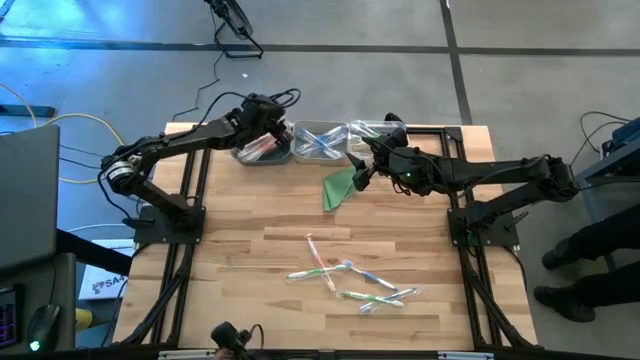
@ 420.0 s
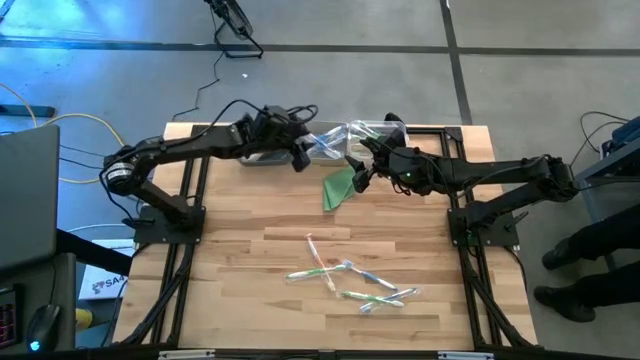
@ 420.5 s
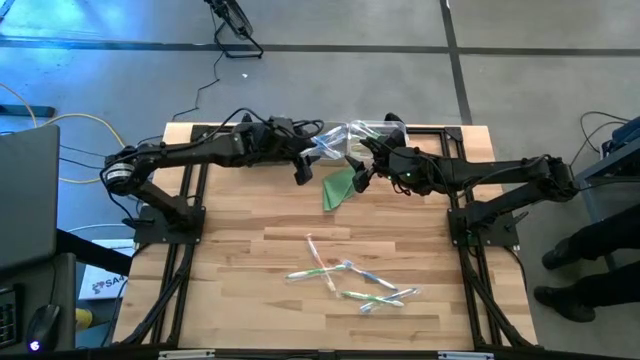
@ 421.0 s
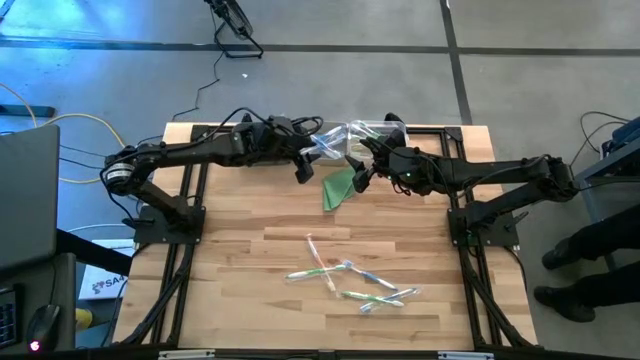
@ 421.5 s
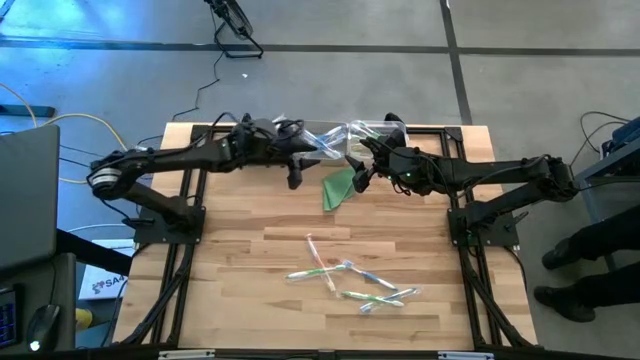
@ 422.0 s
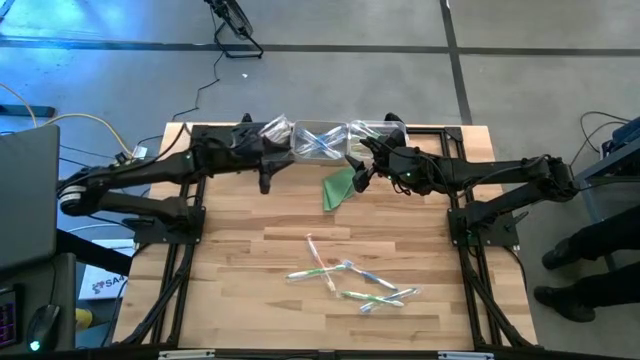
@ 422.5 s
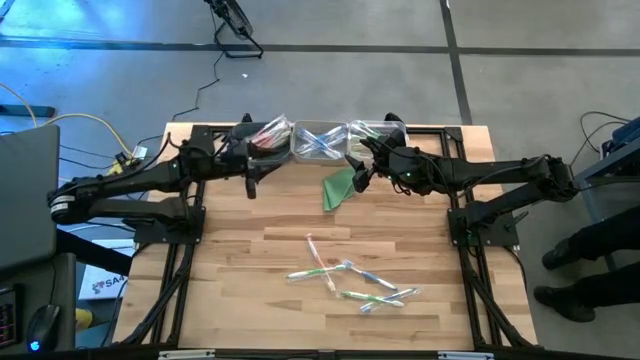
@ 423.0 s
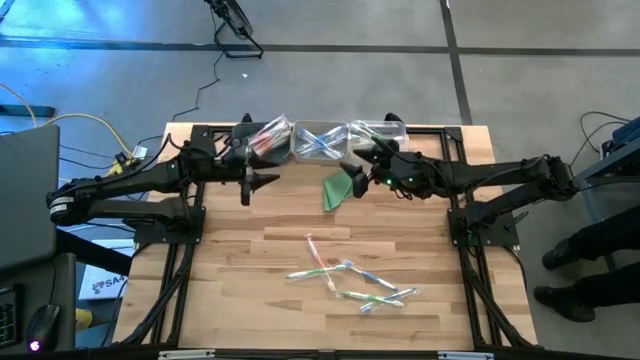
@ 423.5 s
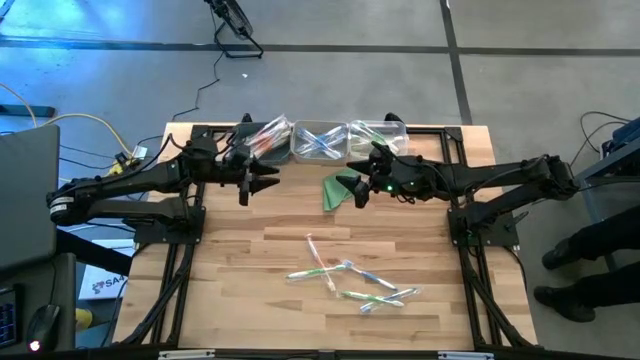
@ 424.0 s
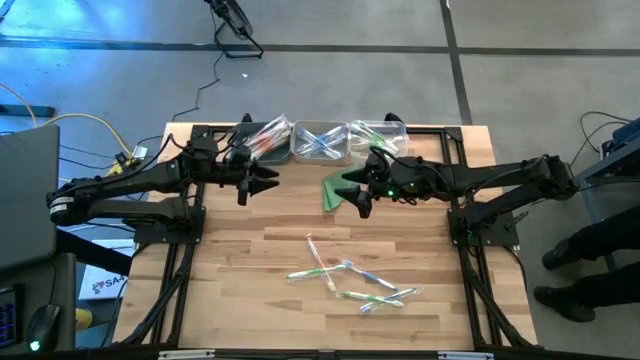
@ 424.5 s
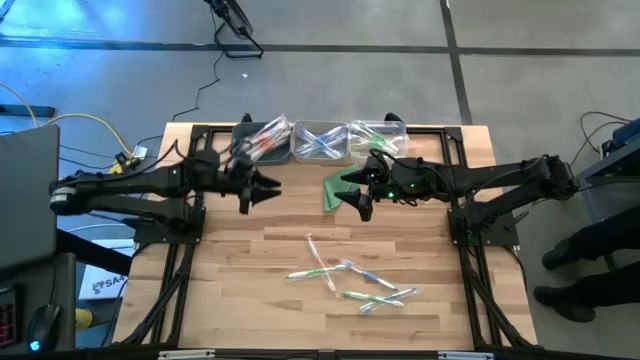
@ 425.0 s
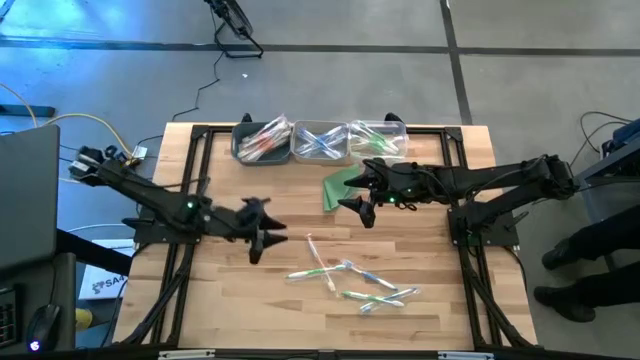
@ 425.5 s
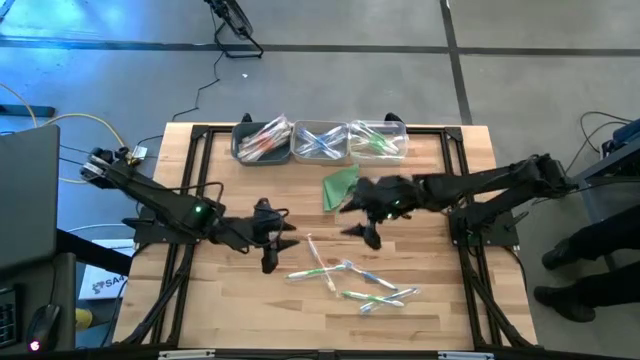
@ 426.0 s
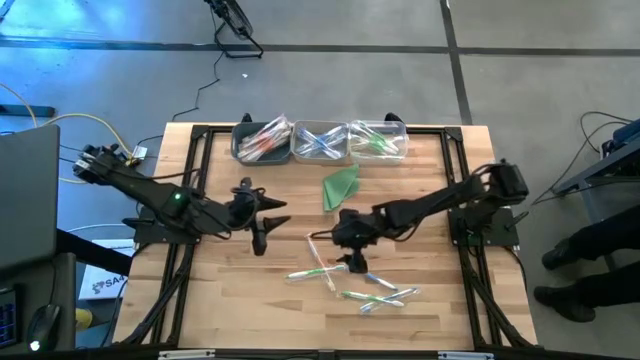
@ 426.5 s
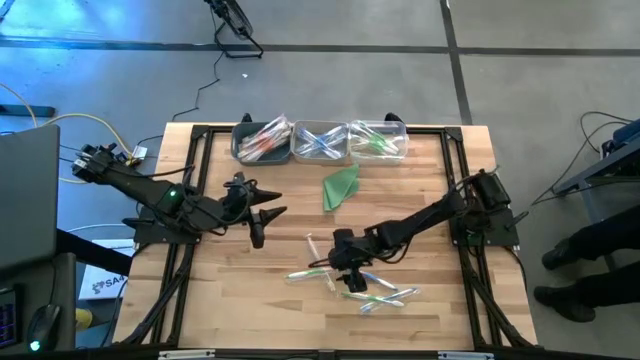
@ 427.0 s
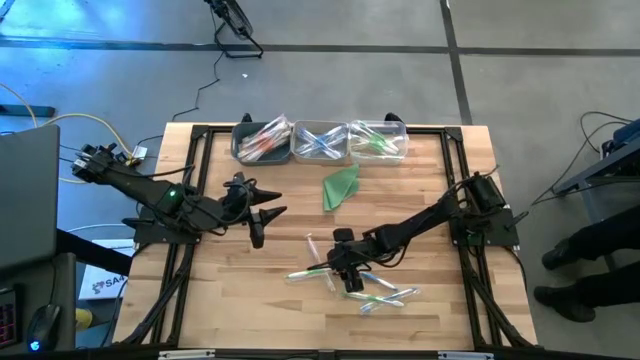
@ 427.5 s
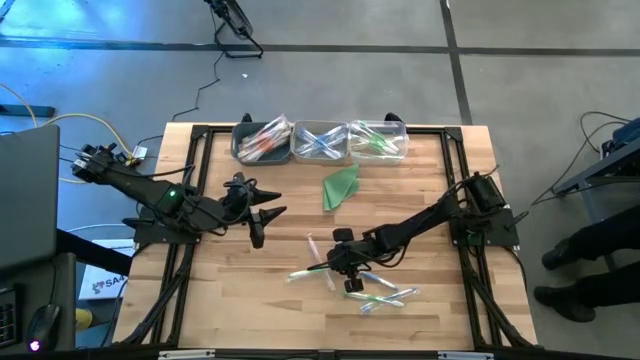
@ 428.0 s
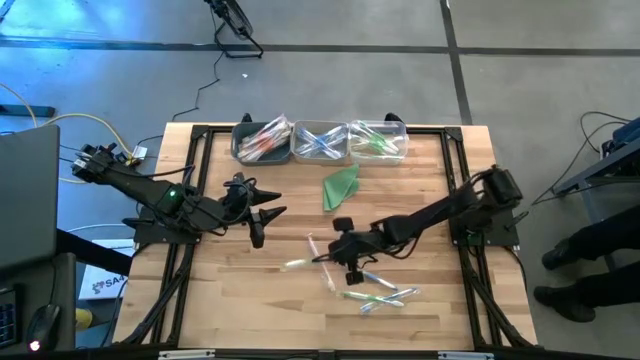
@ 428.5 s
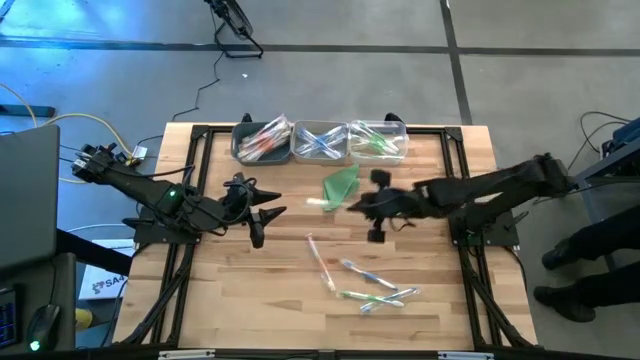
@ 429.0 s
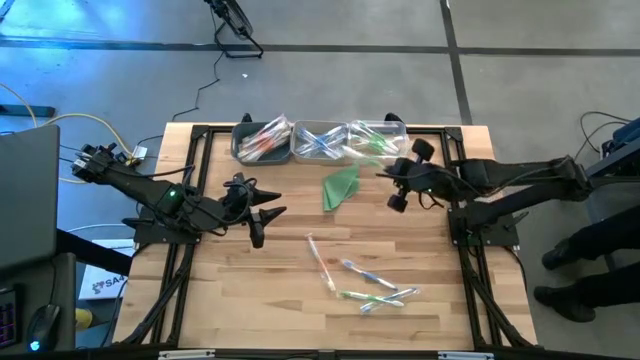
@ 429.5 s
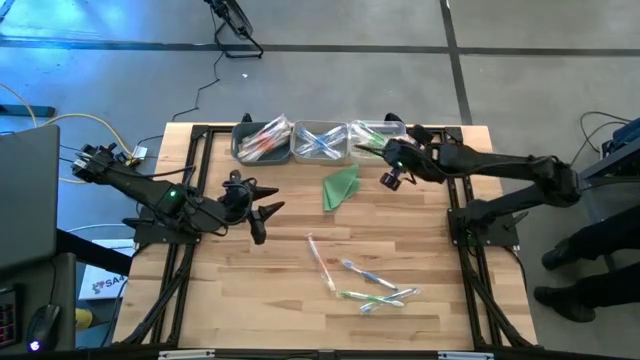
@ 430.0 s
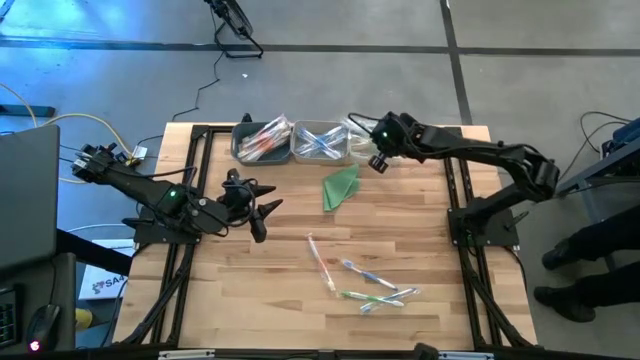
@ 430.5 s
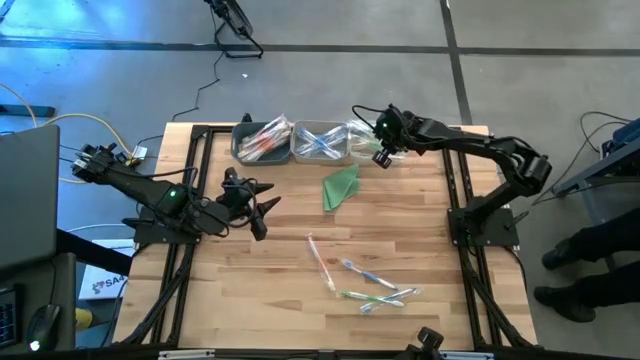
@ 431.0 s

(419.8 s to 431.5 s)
Task: Pick & Place Toothbrushes
Put the green toothbrush into the transparent bin

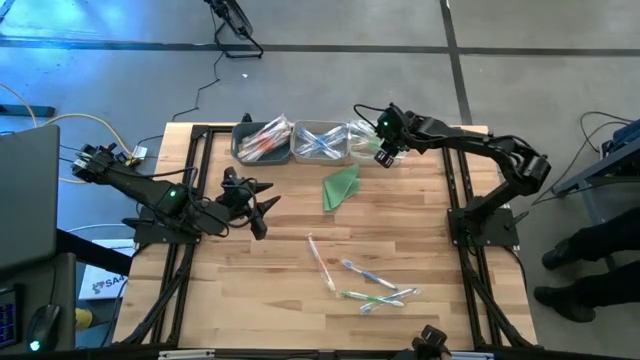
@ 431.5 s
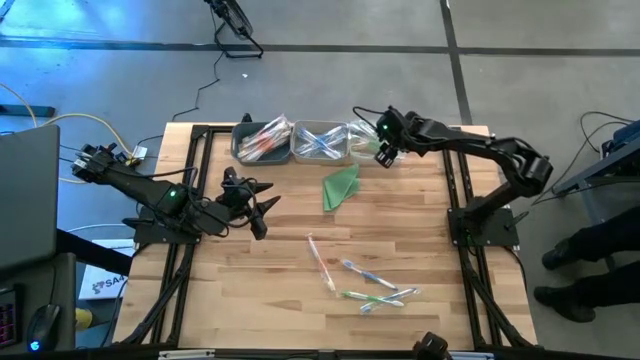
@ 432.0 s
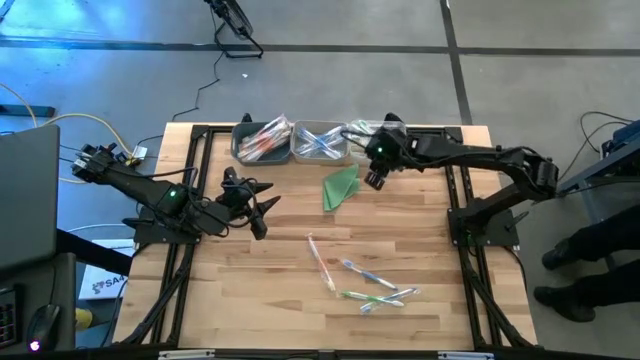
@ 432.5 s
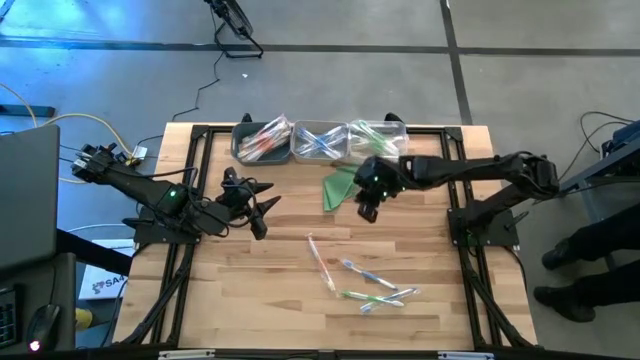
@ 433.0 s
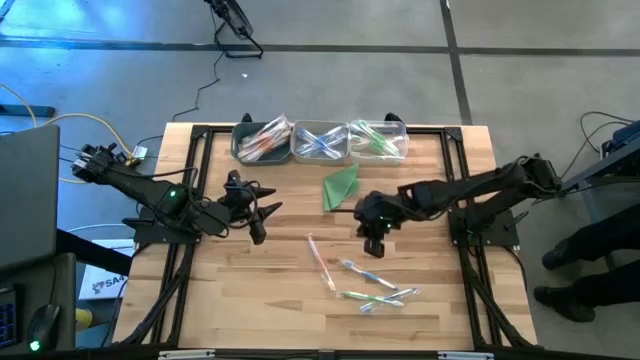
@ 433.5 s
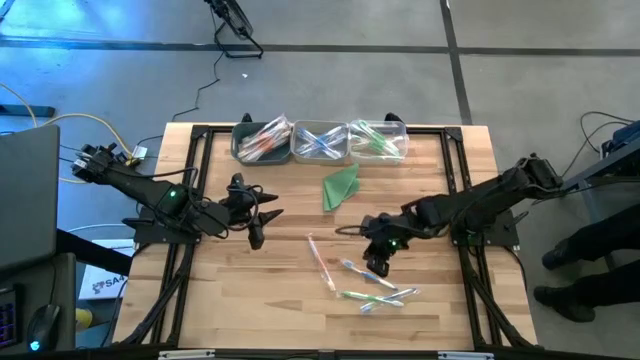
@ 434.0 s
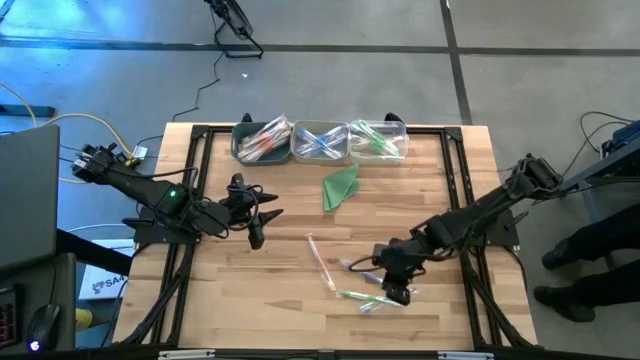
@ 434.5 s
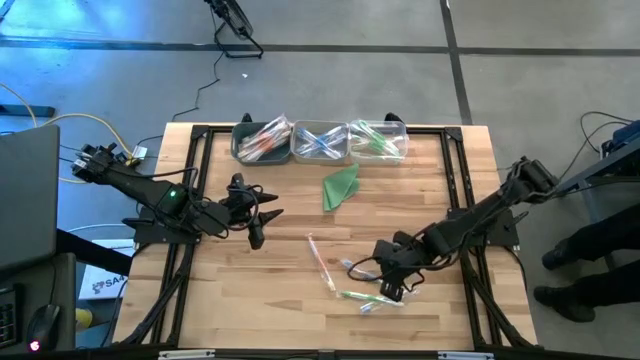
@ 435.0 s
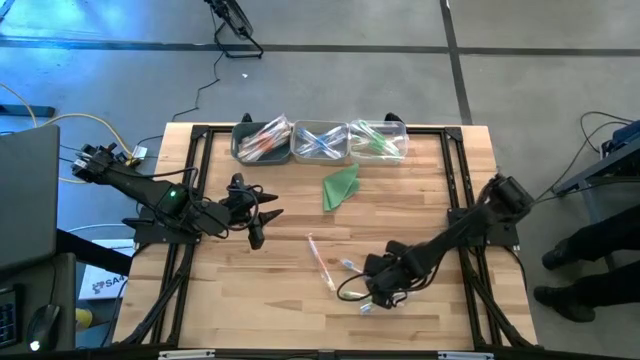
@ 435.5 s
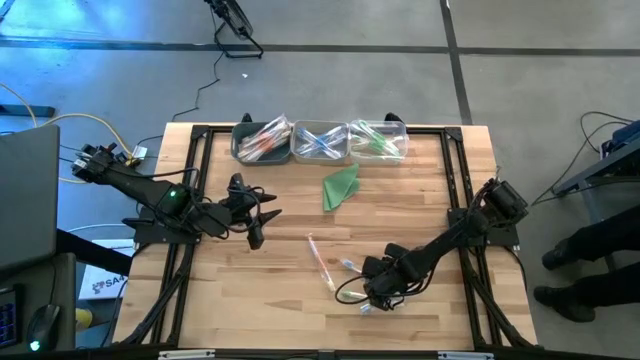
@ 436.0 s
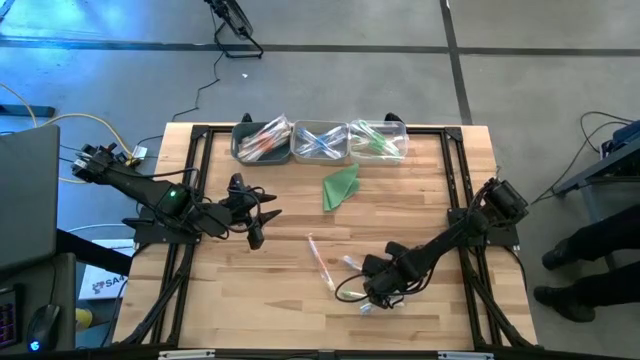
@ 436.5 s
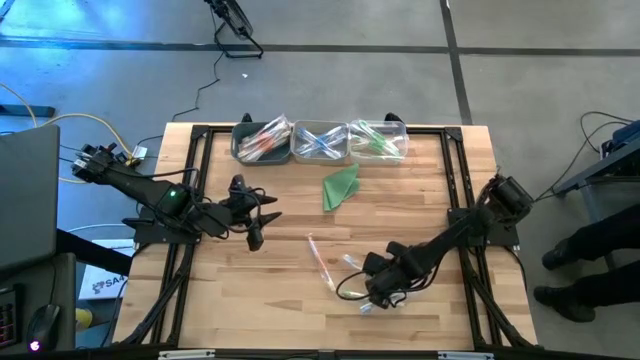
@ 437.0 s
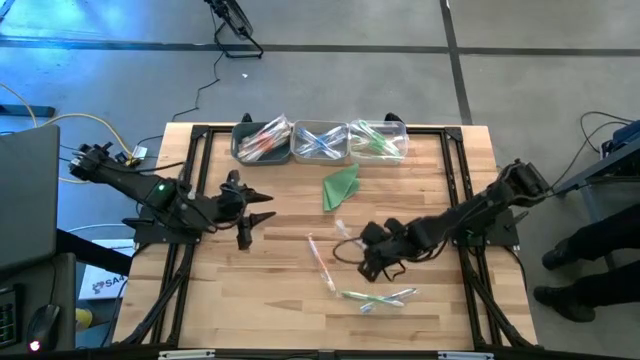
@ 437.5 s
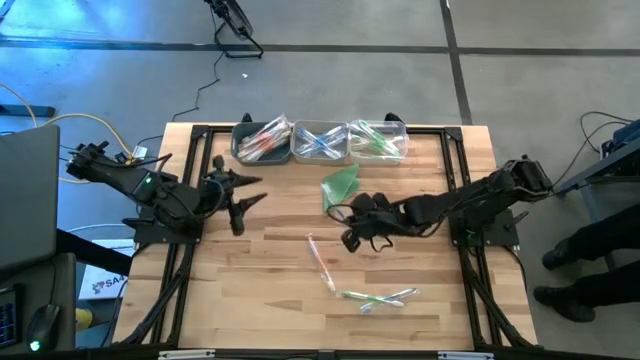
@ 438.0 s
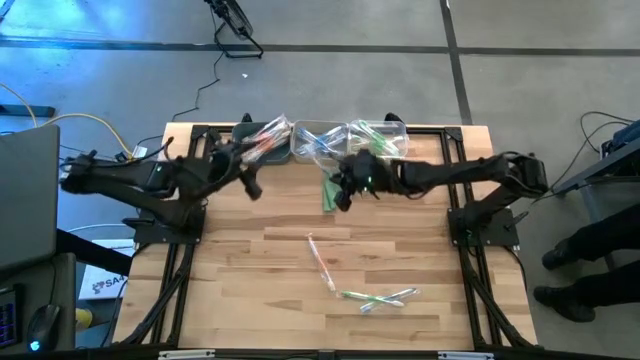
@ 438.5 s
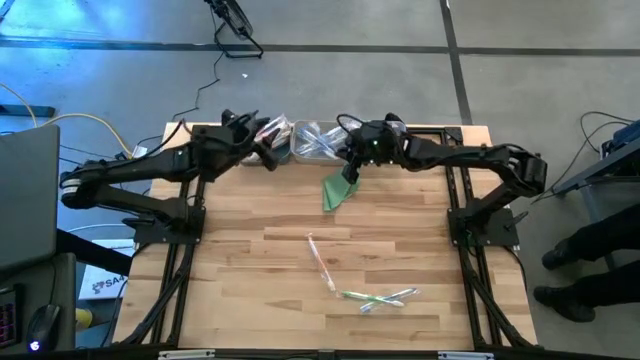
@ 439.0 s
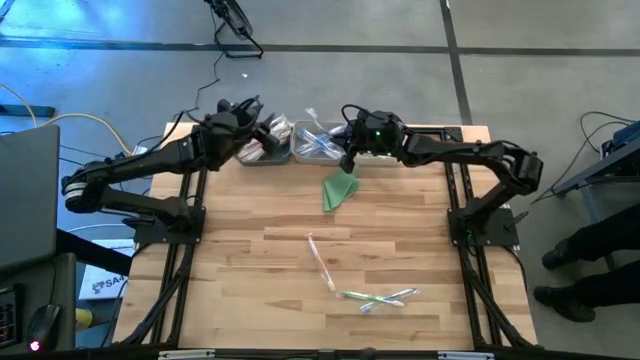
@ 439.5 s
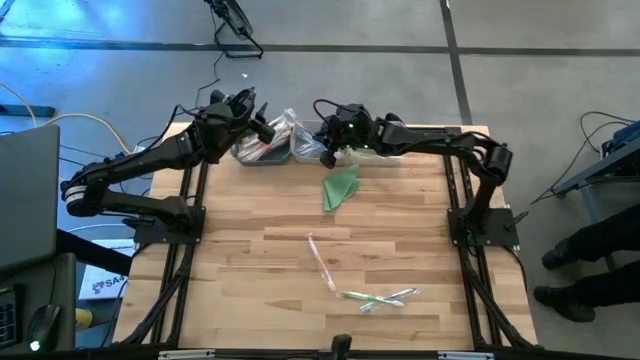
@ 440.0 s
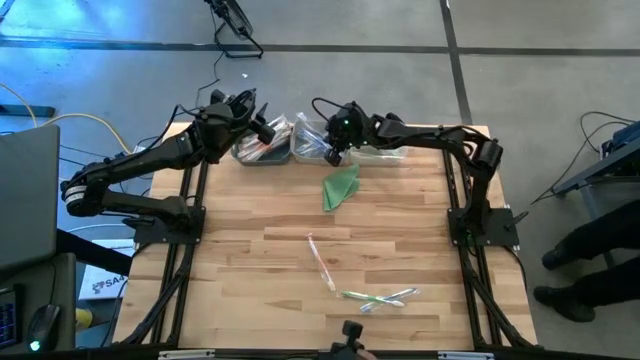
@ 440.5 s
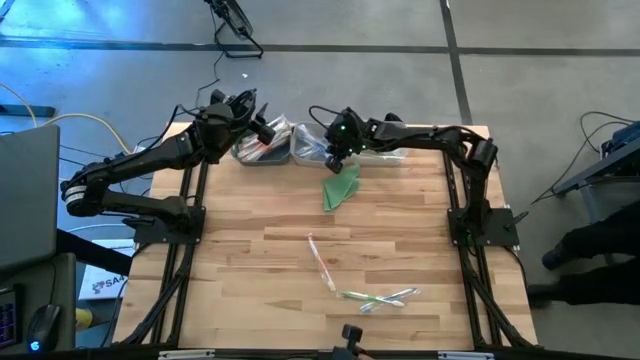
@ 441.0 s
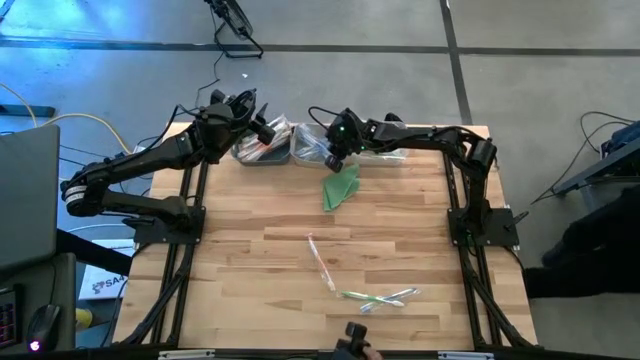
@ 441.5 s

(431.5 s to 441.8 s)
Put the blue toothbrush into the gray bin
